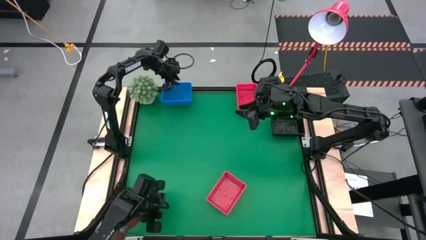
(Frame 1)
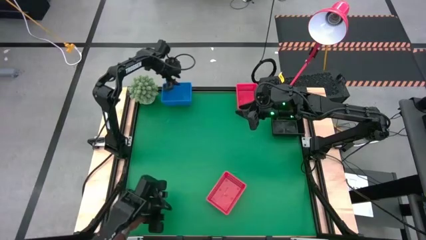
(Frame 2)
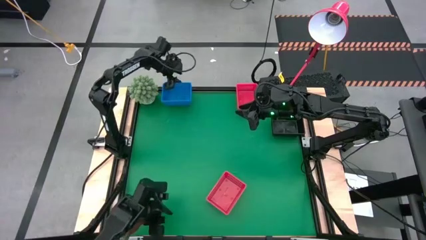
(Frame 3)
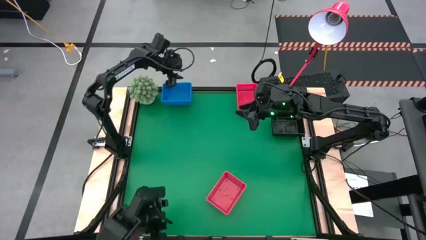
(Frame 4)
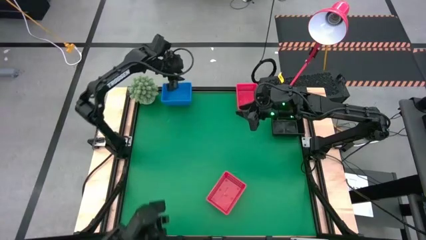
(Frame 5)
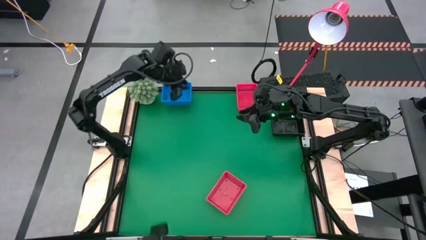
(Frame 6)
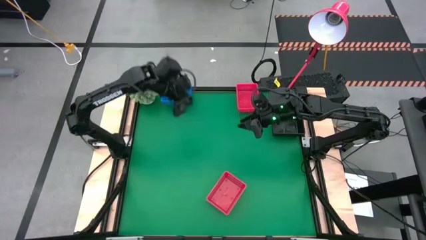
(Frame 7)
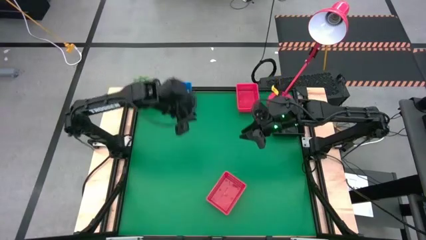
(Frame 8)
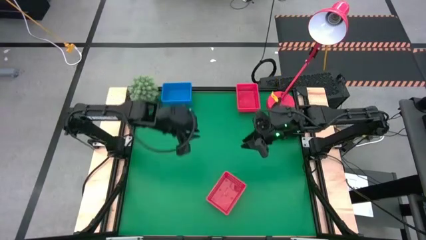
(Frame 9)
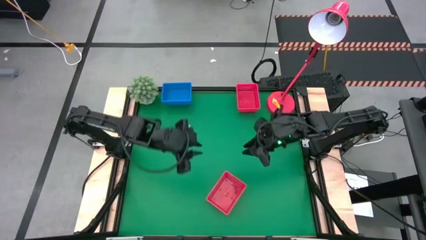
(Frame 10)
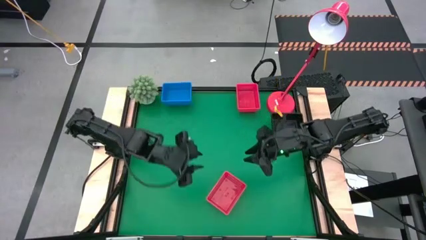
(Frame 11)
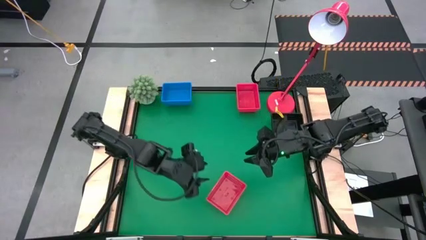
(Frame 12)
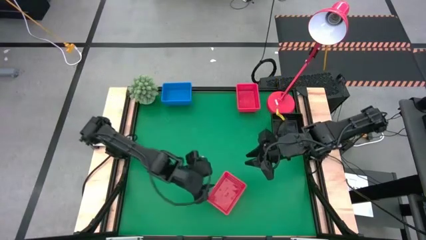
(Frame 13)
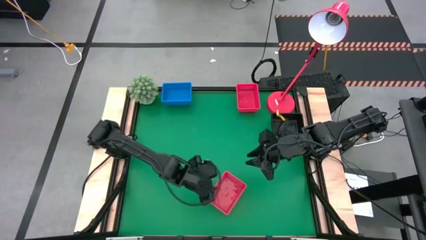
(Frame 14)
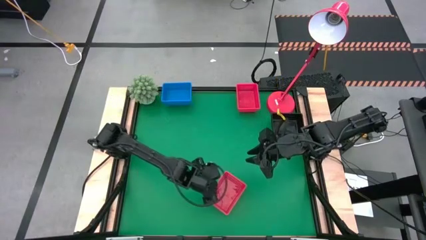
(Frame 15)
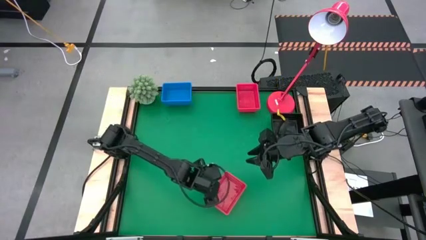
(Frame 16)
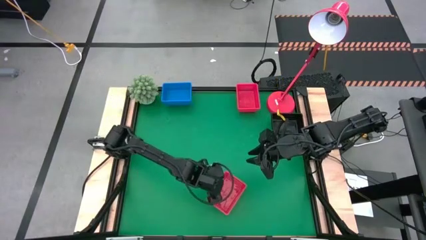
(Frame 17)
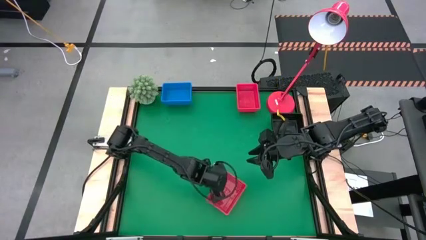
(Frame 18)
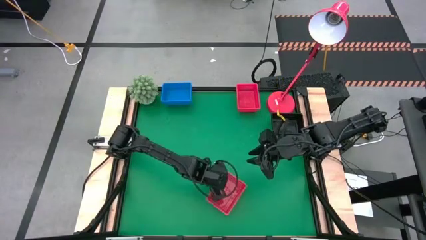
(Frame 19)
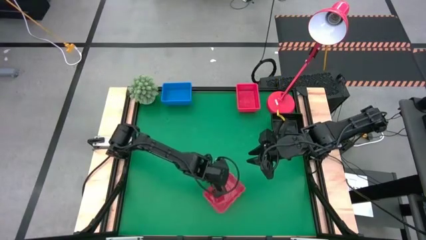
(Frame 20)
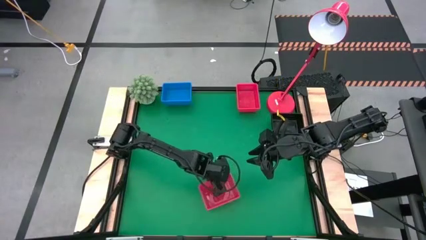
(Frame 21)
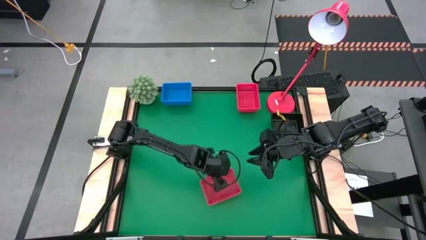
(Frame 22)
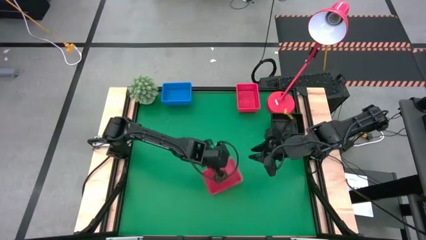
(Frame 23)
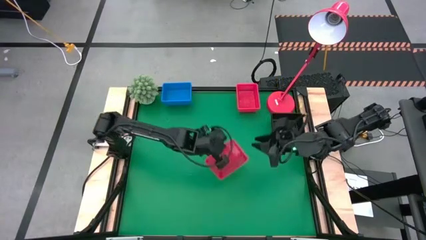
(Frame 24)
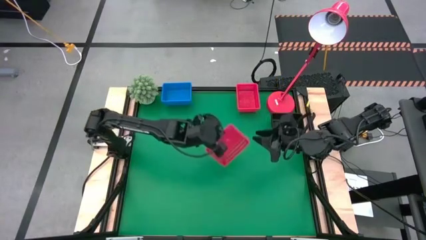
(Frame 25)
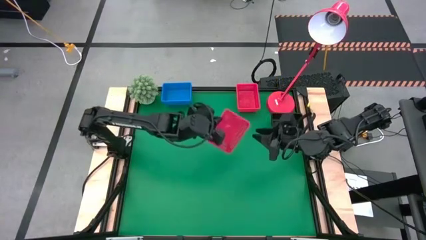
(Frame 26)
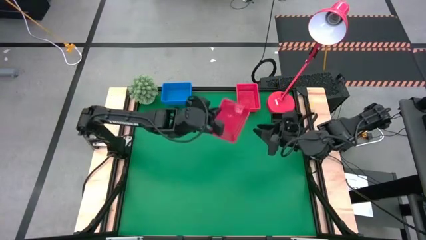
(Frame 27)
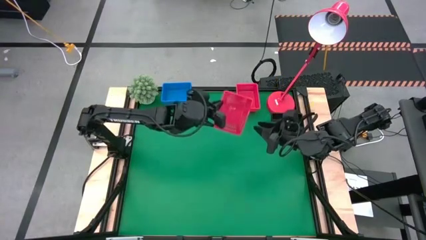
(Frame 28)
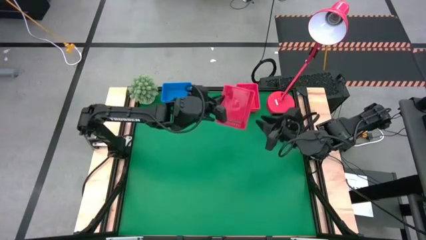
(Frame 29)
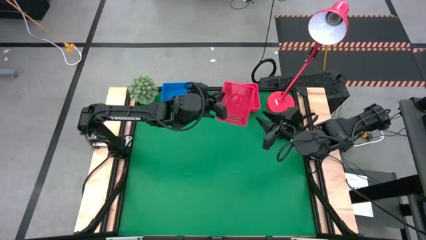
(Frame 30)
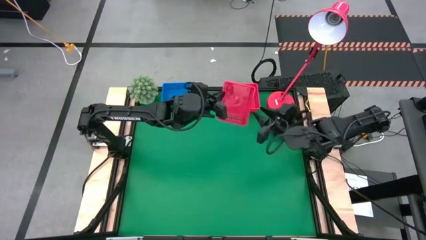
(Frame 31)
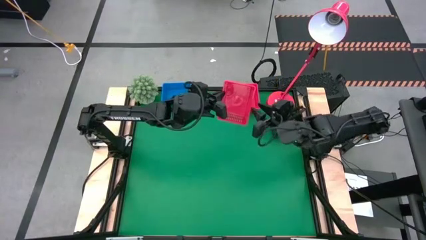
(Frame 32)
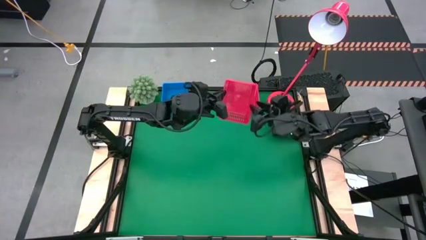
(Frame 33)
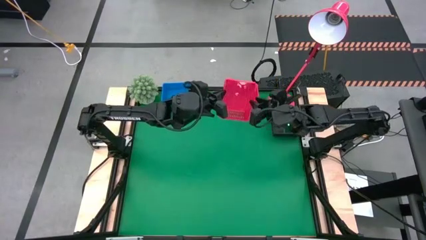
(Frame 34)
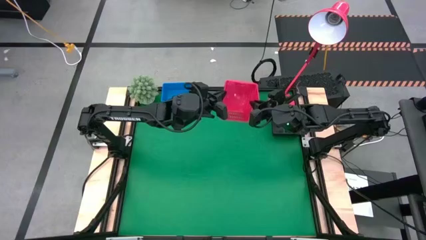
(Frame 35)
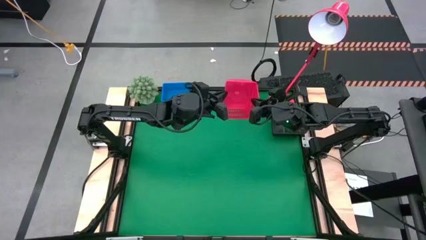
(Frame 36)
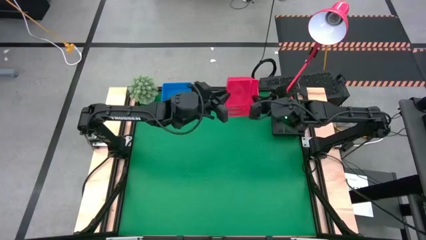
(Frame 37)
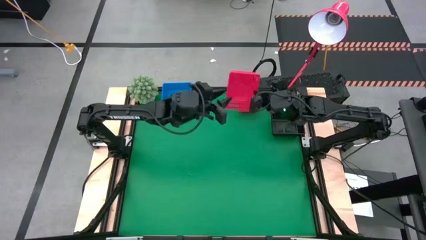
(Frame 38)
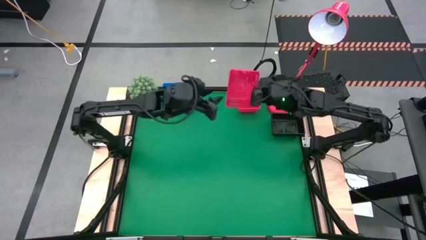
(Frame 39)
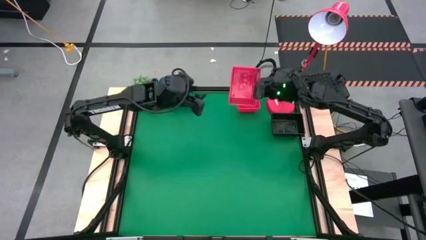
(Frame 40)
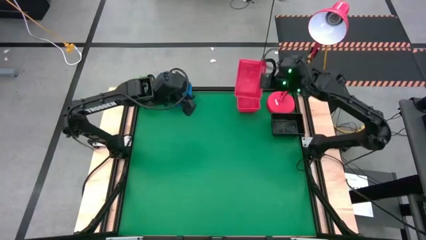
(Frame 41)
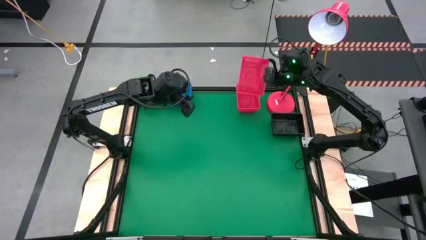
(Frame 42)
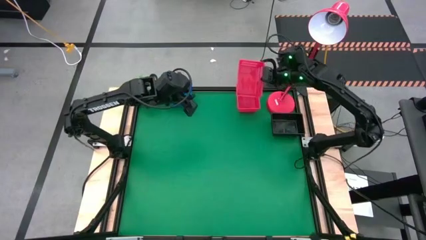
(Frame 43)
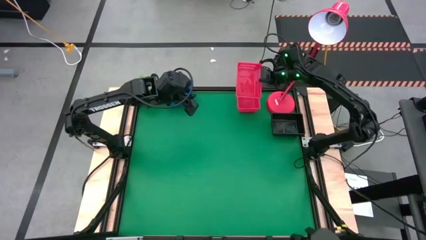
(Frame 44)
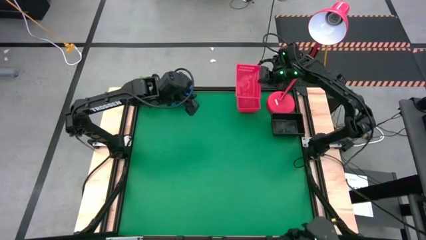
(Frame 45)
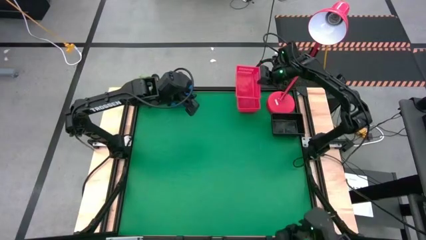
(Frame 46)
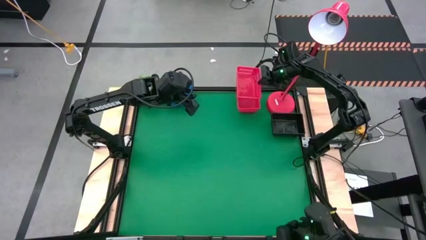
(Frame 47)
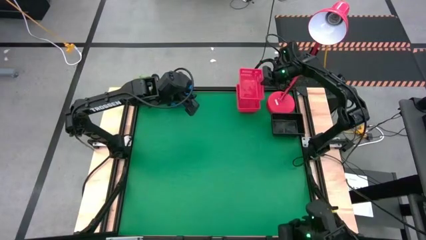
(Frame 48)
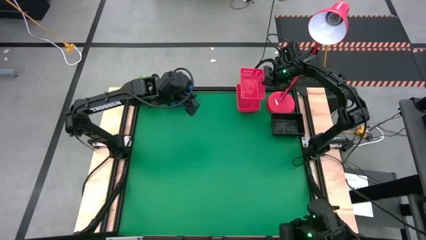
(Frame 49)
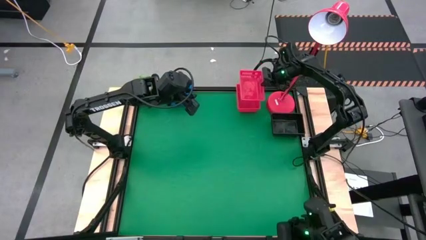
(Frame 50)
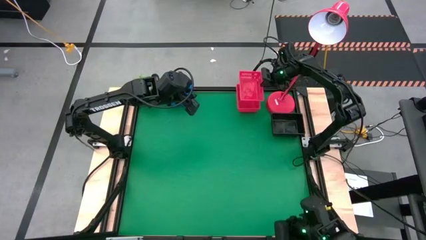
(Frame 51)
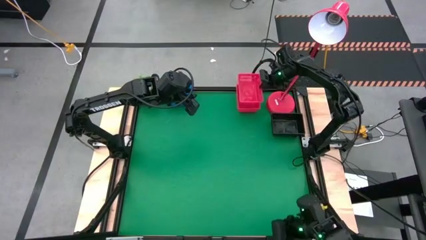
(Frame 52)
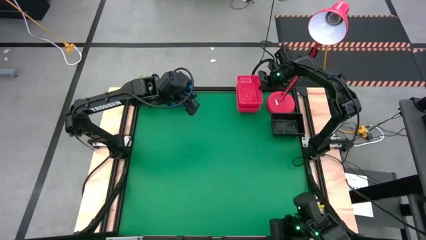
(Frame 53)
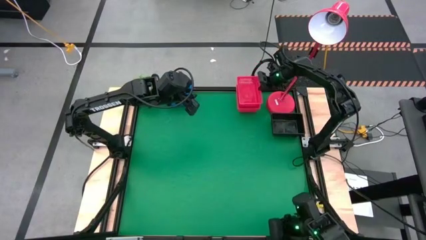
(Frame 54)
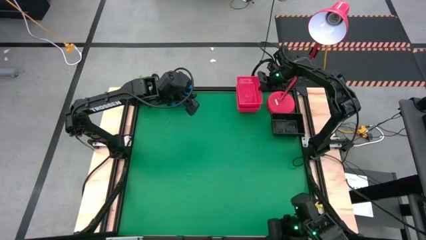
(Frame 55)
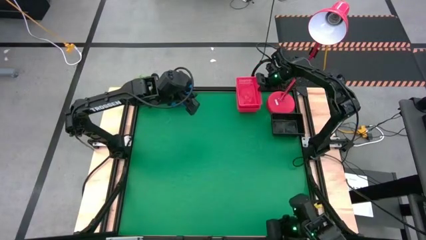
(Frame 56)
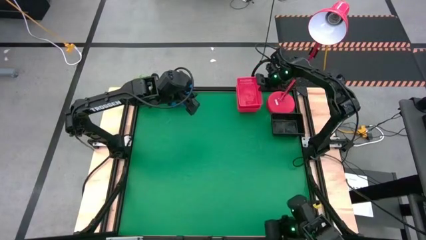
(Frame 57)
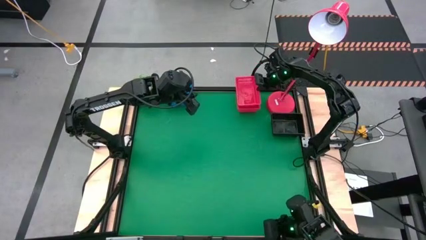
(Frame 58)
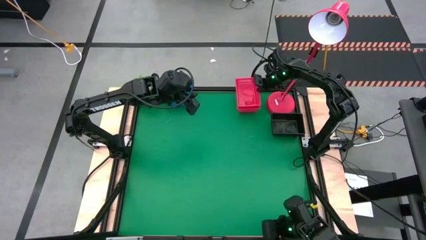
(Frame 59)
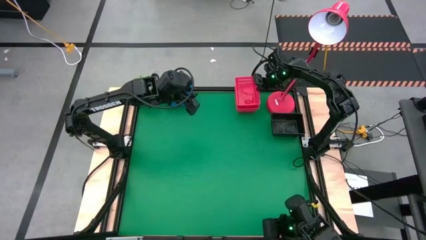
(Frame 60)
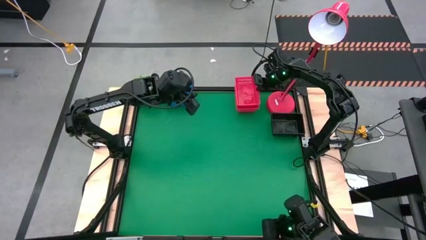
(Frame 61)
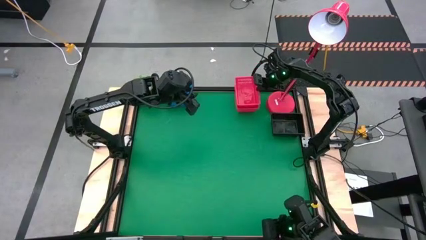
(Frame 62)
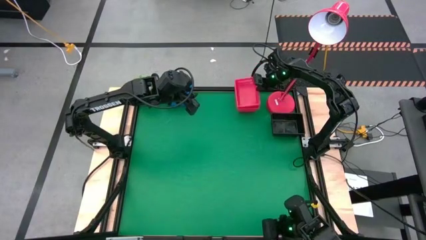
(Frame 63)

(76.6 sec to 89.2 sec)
Stack the bottom red bin on top of the stacked red bin
